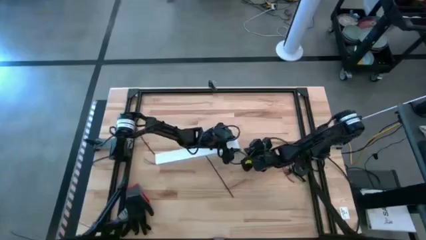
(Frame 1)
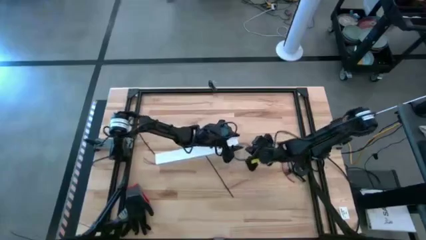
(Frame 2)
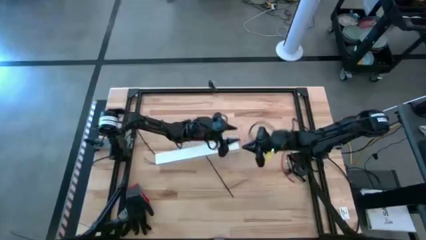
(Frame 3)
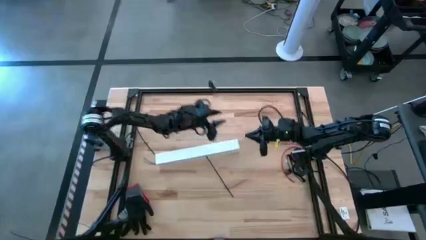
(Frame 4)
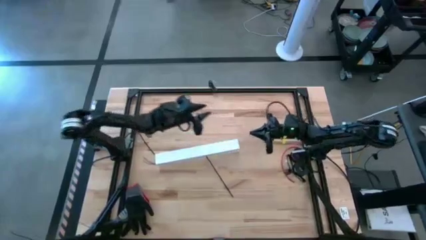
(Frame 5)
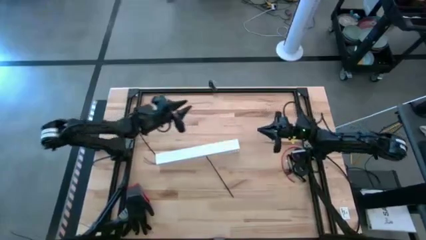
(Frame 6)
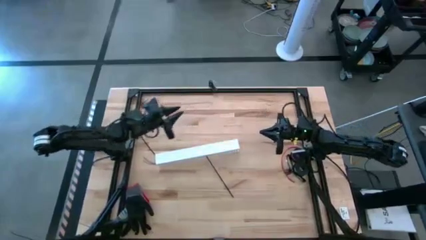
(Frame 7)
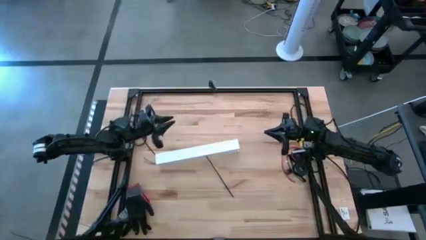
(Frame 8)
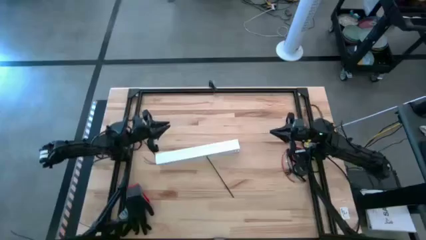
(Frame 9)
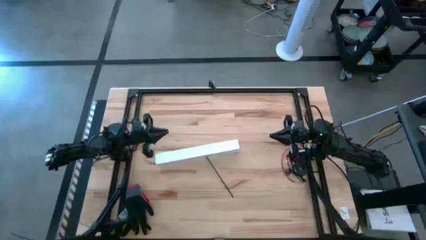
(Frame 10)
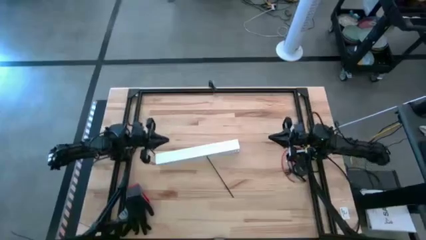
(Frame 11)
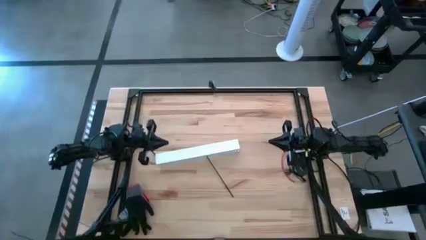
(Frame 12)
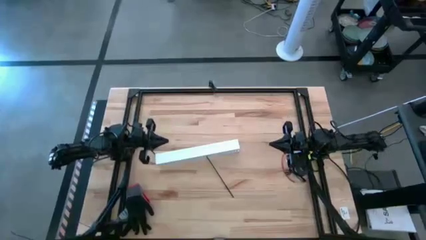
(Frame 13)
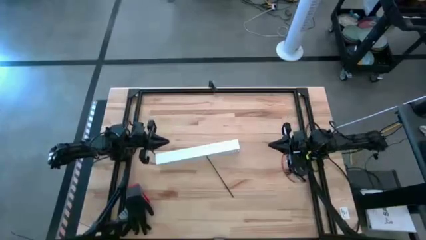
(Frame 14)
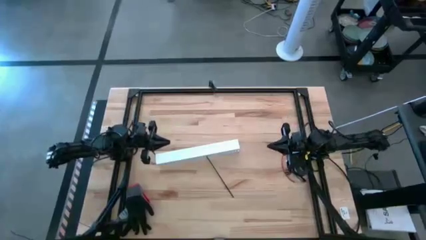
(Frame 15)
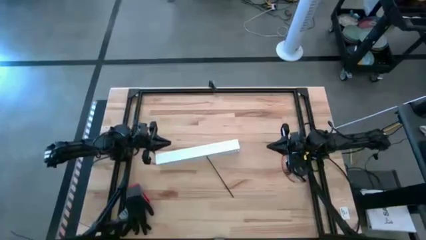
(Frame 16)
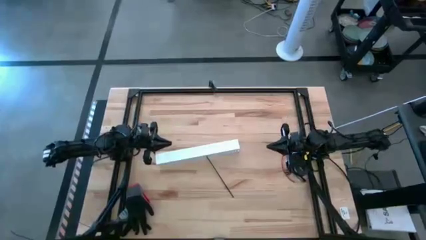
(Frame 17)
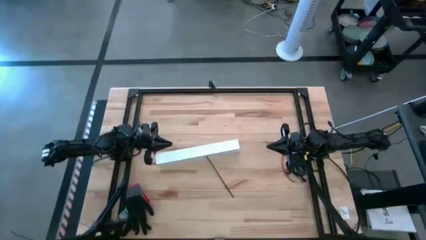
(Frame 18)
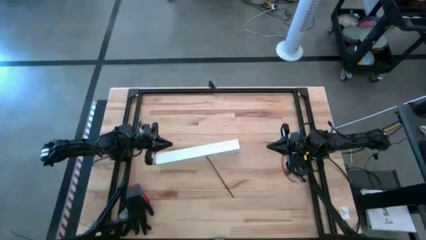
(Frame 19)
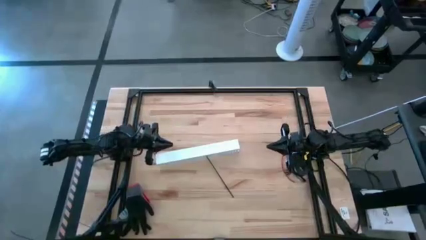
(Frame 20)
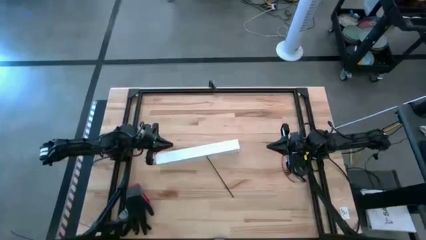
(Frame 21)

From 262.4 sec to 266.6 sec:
Task: Ziptie cables
Return to Home Position

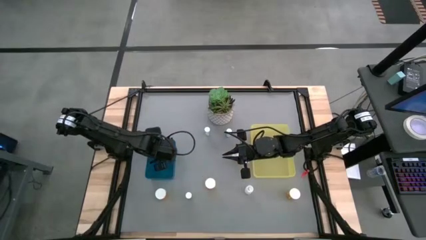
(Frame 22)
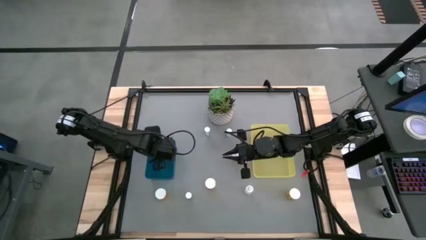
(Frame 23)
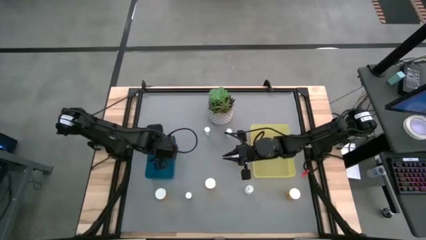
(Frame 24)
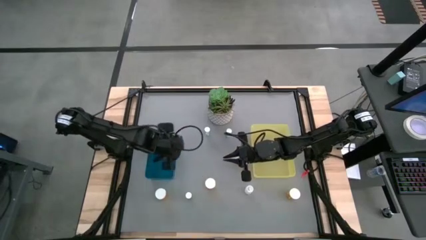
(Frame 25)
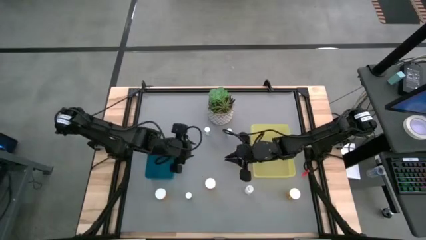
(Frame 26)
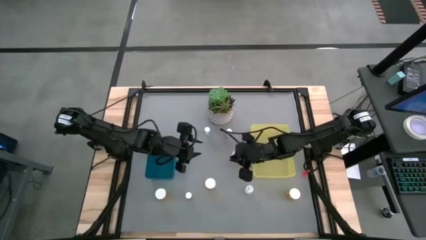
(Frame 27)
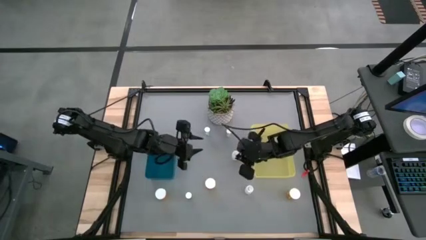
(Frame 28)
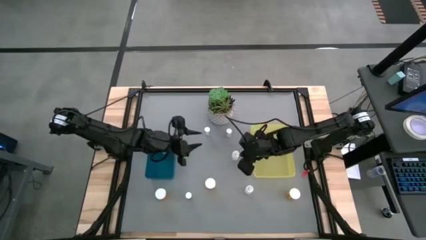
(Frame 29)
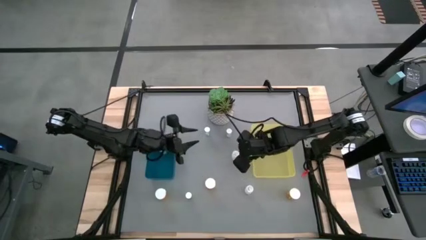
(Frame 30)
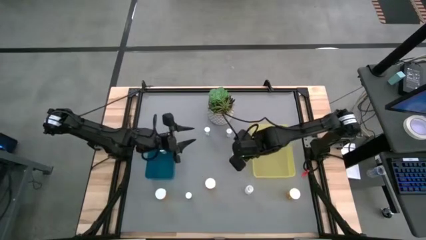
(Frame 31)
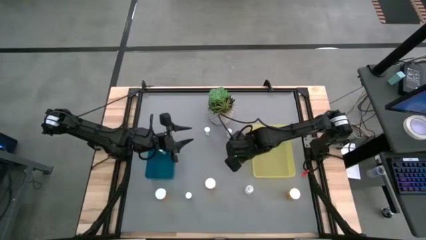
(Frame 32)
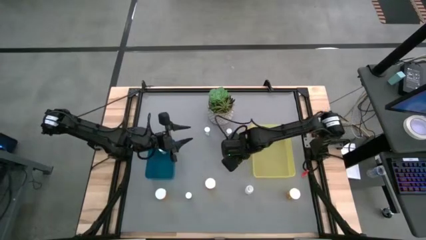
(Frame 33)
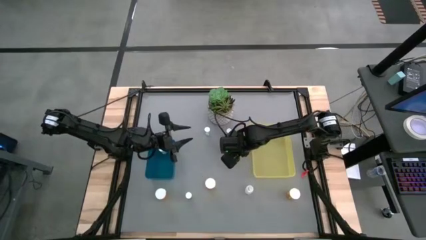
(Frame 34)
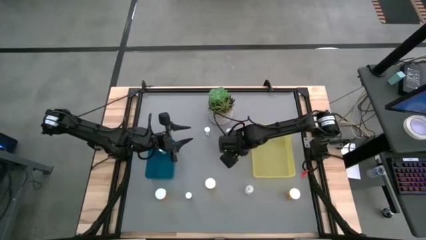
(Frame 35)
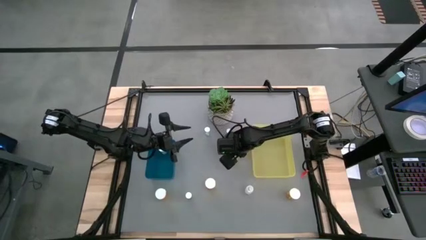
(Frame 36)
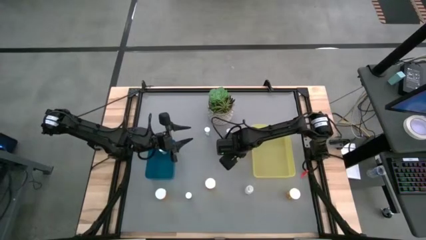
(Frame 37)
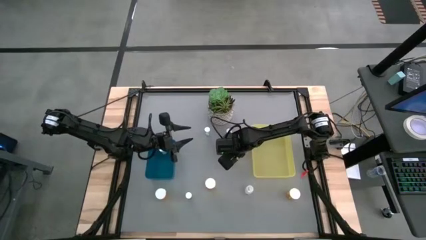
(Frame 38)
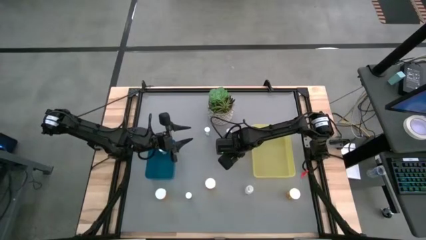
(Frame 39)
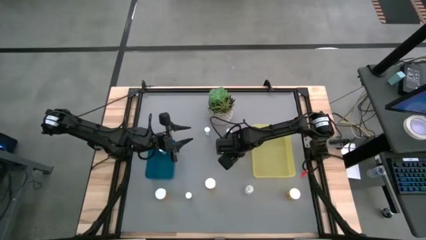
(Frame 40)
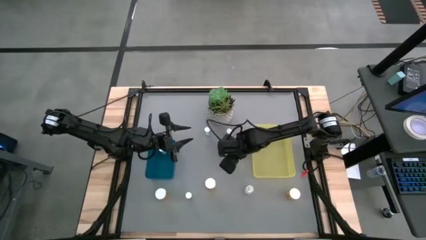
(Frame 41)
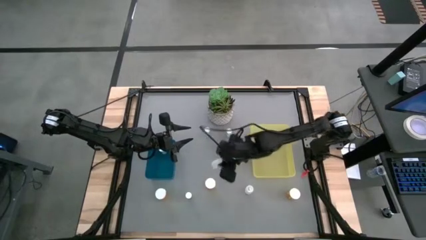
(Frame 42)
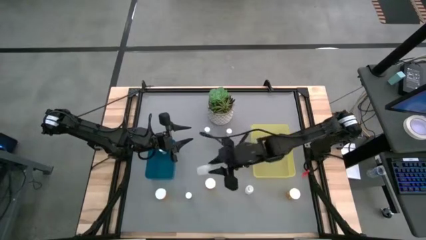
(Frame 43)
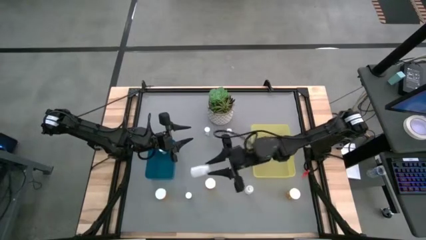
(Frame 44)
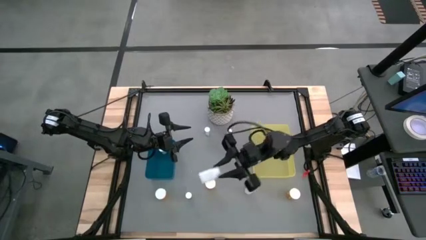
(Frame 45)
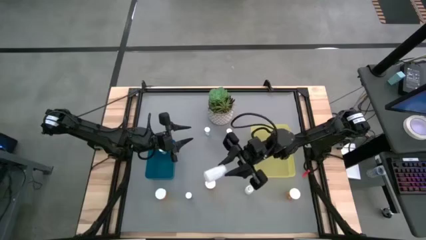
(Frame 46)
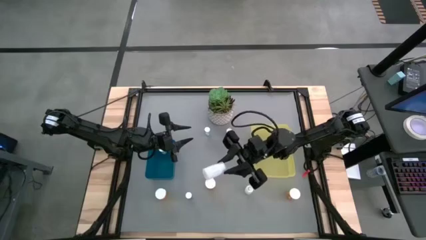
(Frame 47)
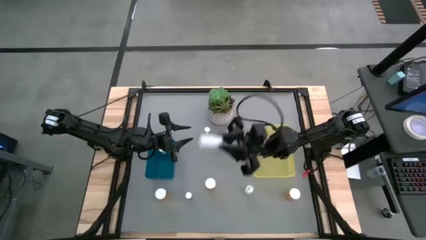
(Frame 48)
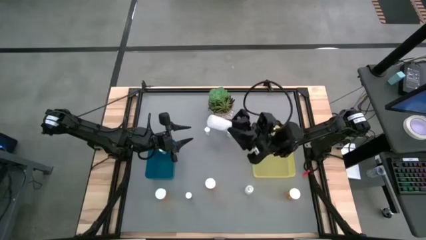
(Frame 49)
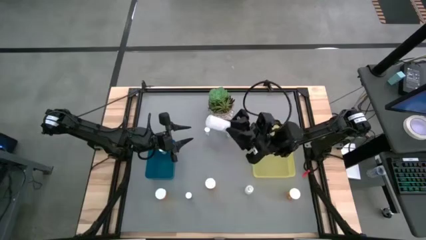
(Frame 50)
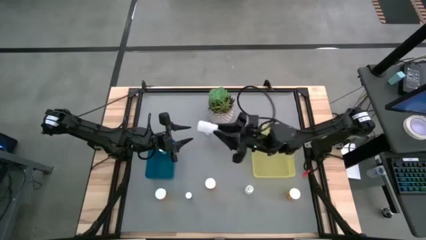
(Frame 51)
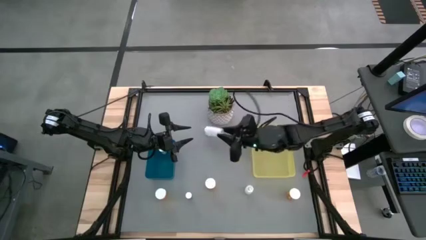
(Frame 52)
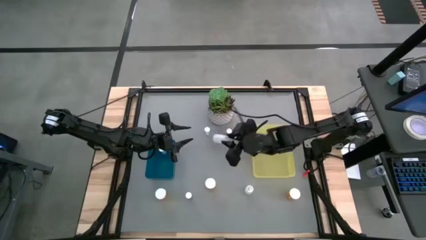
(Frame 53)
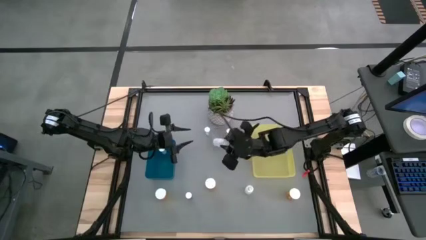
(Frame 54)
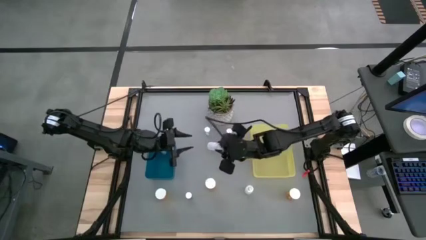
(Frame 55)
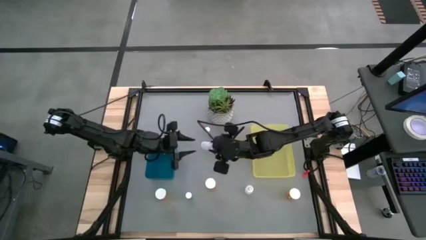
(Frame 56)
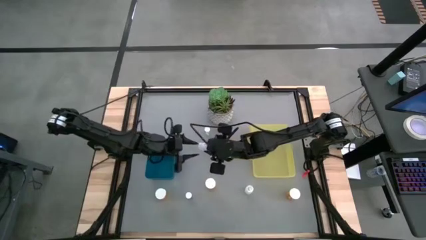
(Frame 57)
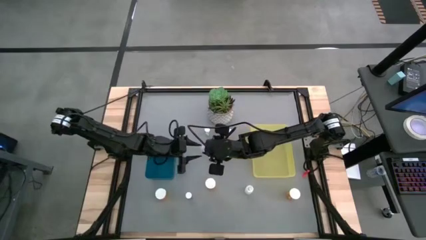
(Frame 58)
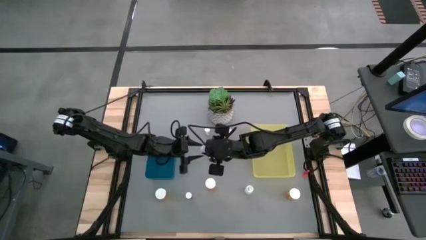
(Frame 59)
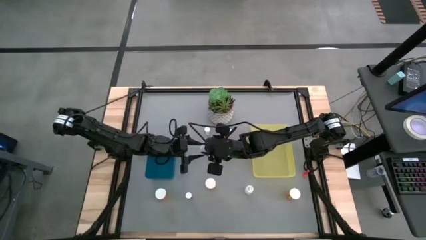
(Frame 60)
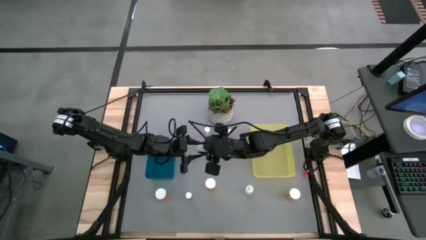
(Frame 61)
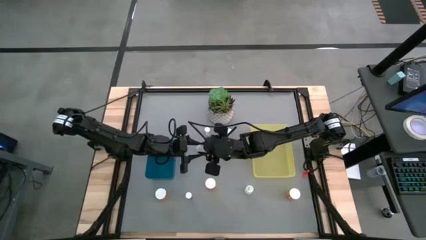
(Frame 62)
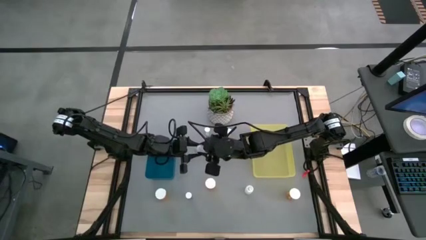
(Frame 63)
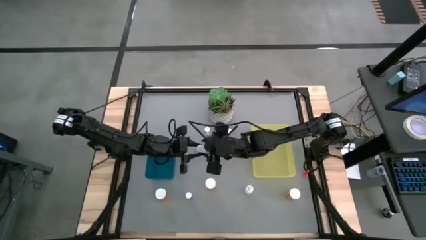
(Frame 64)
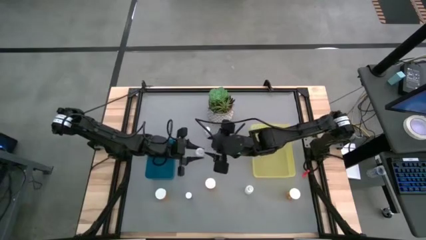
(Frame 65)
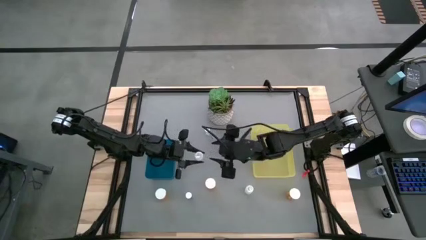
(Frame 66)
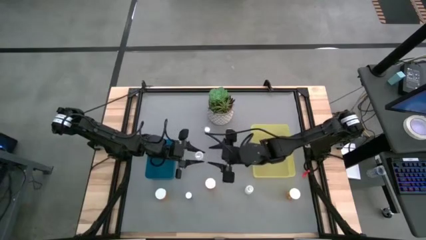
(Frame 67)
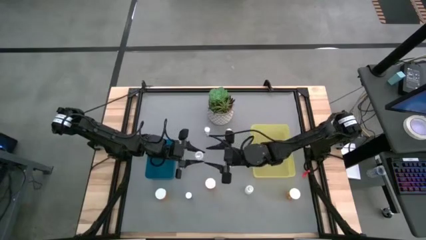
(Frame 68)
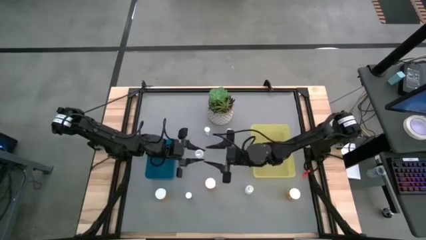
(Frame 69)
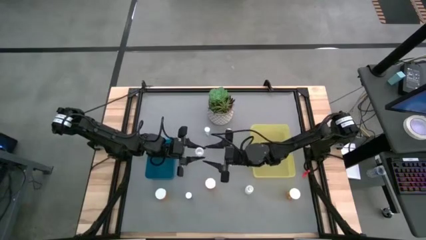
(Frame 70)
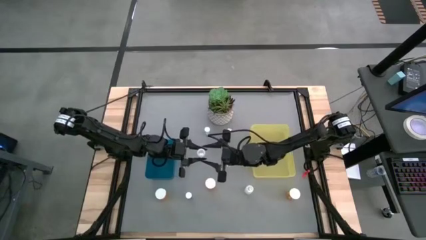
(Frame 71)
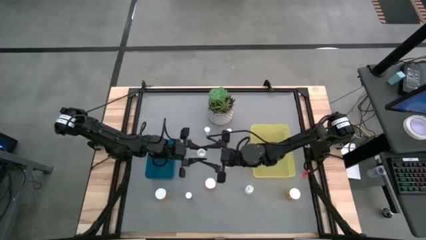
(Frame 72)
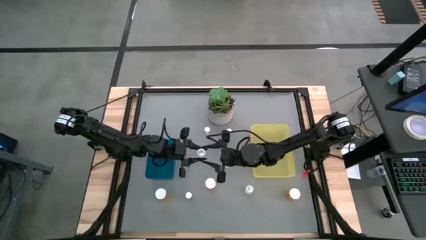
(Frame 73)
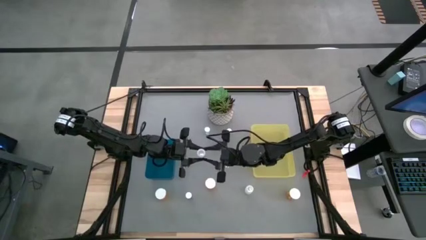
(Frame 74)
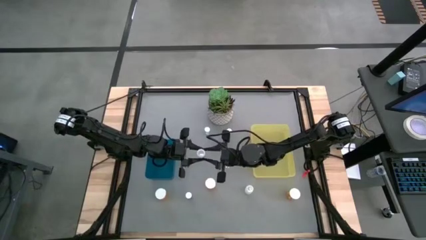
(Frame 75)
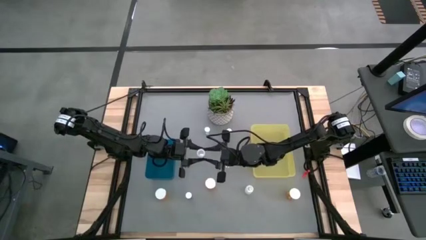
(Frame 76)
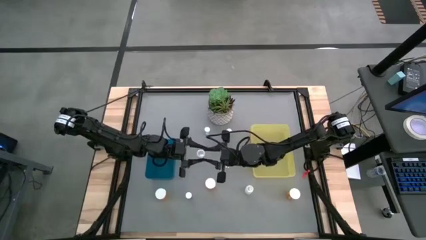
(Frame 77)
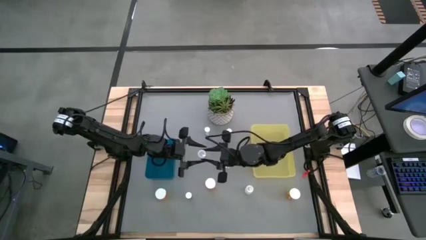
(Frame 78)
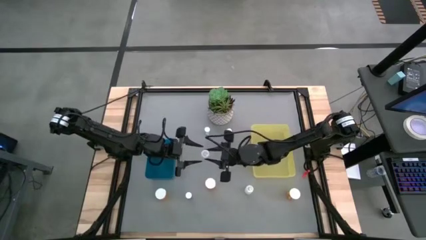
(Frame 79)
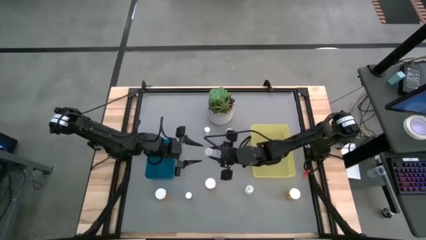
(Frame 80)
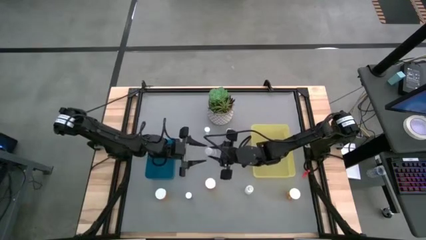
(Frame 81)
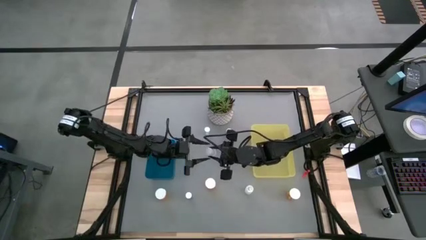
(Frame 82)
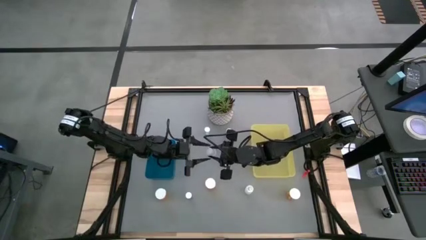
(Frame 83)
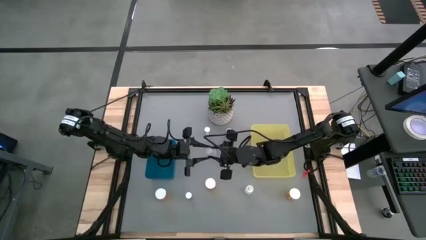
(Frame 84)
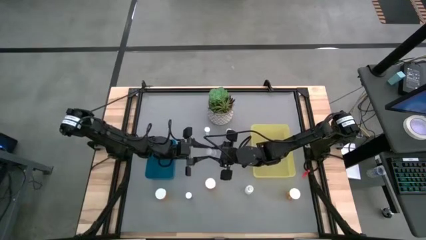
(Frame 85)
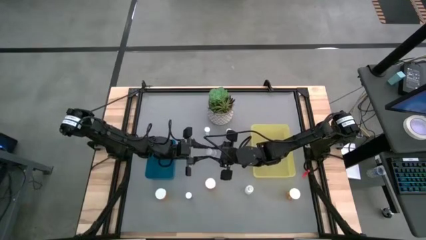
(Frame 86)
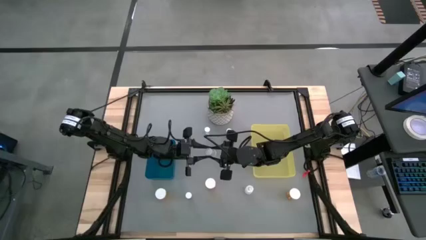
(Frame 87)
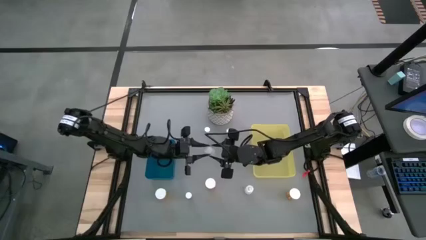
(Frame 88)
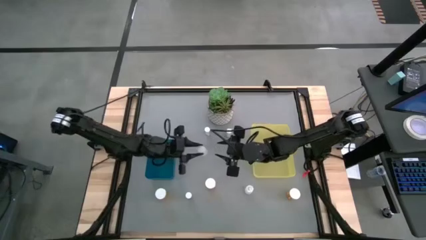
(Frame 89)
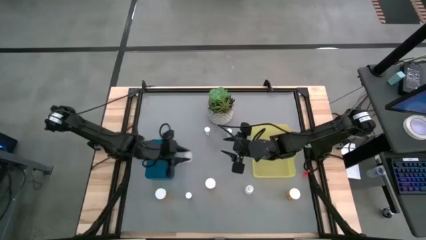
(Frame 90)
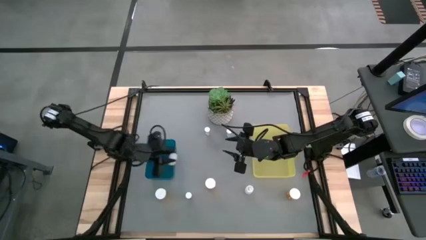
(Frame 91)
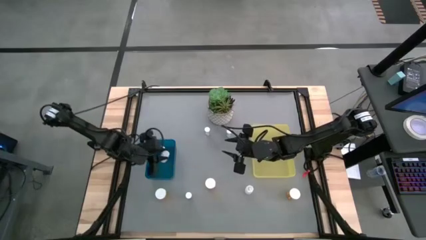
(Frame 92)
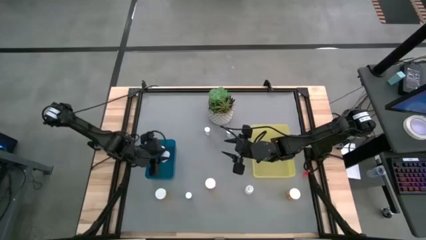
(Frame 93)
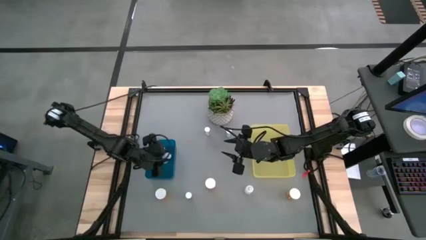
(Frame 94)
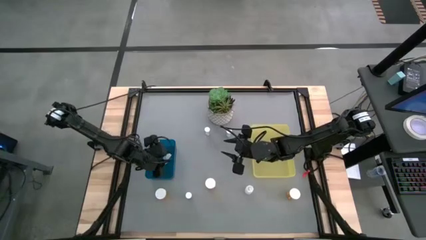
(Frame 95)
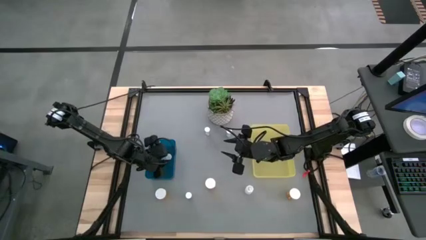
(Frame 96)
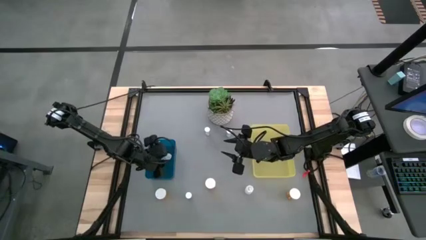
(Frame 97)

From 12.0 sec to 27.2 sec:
Task: Pick and place medicine bottles into bin by pill shape (circle, oval)
Put the top white pill bottle into the left blue bin
